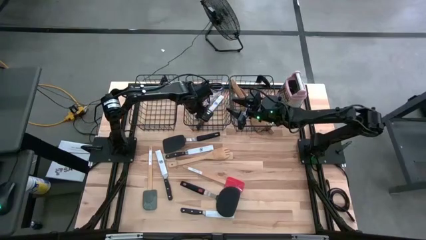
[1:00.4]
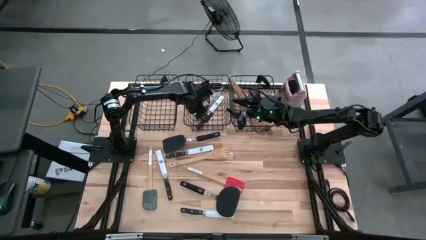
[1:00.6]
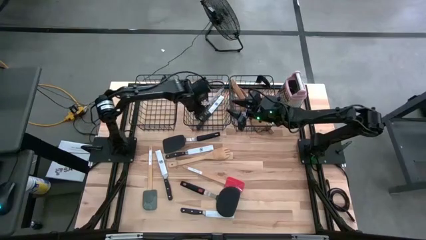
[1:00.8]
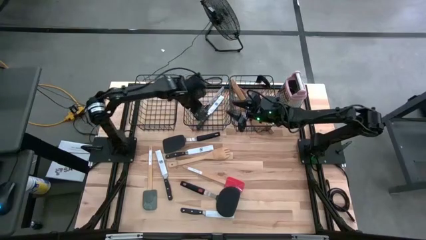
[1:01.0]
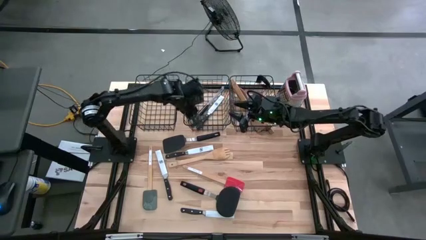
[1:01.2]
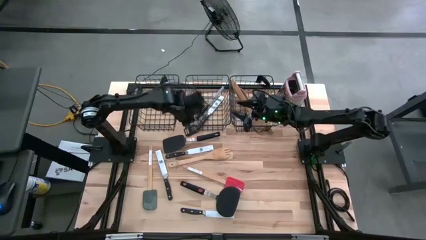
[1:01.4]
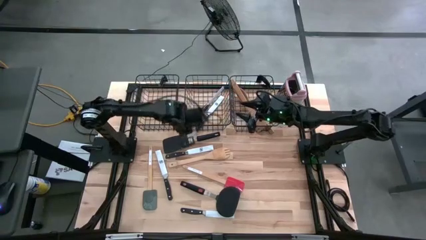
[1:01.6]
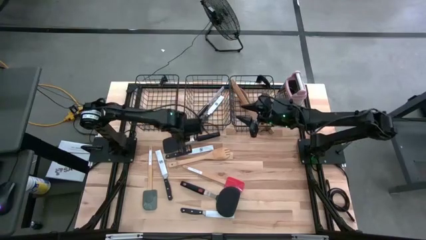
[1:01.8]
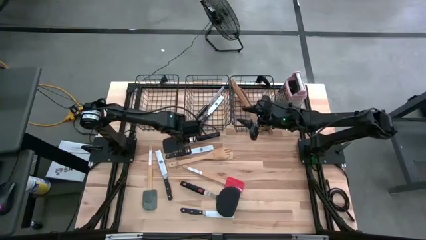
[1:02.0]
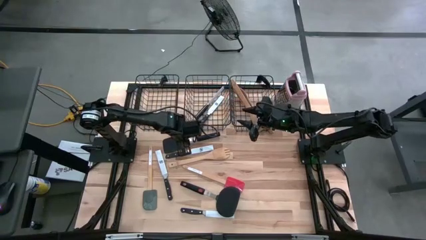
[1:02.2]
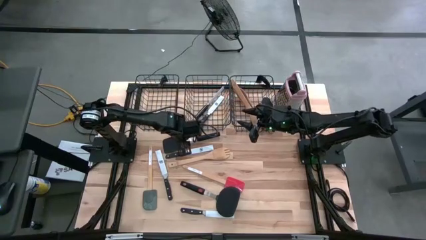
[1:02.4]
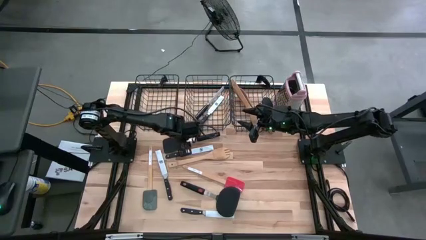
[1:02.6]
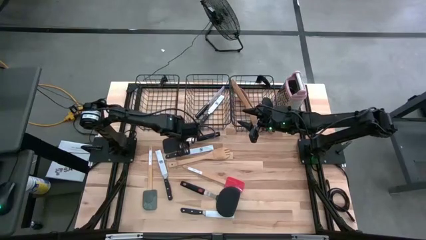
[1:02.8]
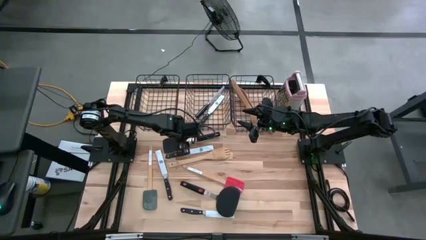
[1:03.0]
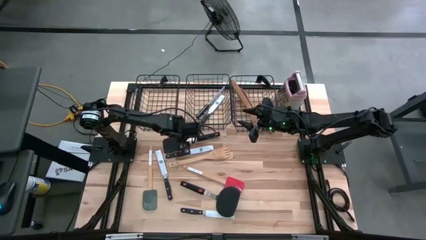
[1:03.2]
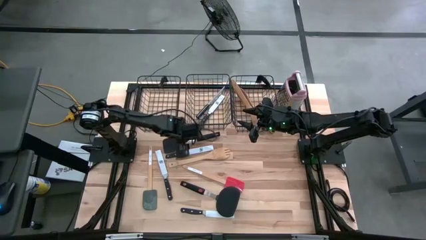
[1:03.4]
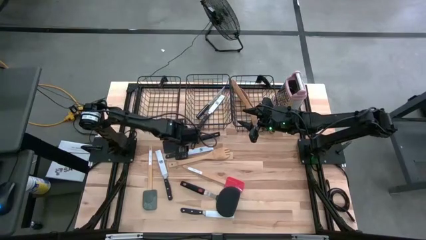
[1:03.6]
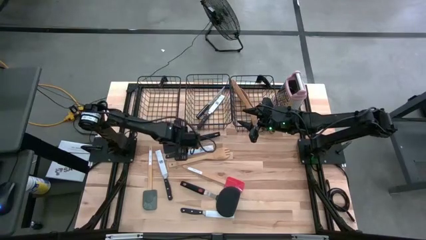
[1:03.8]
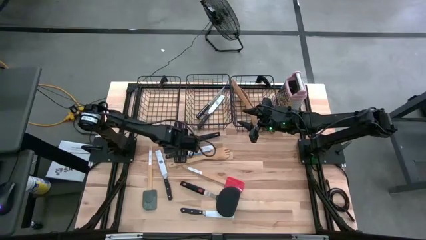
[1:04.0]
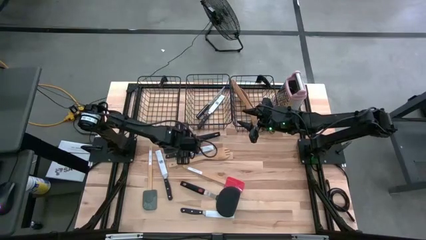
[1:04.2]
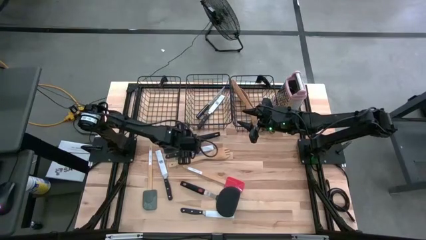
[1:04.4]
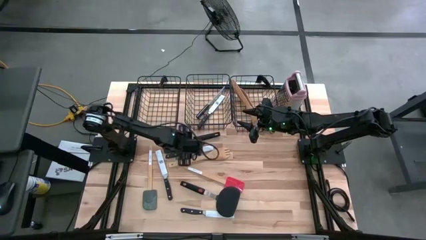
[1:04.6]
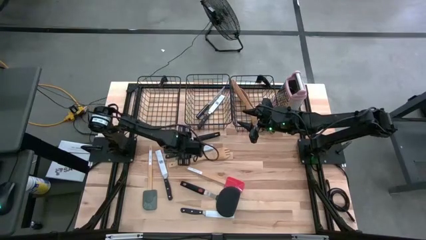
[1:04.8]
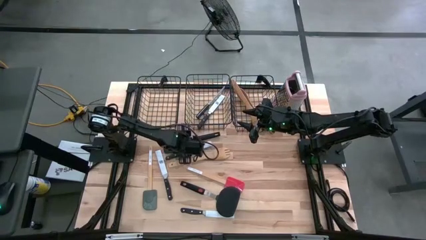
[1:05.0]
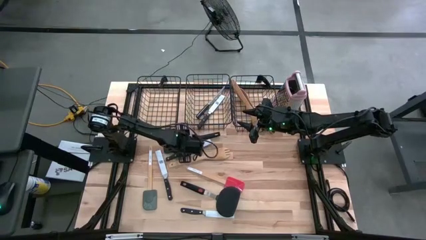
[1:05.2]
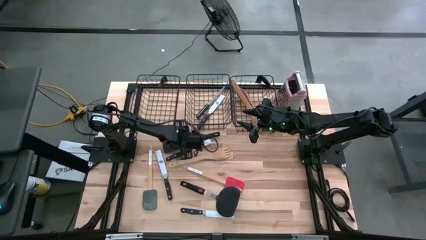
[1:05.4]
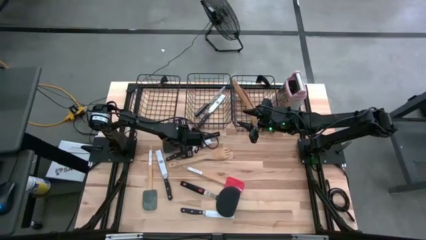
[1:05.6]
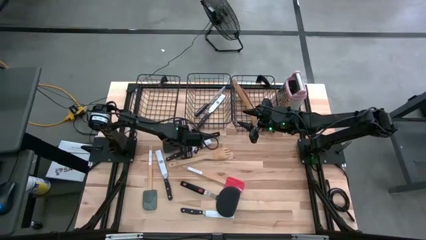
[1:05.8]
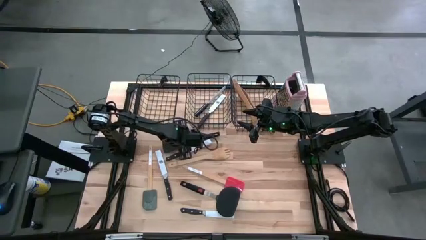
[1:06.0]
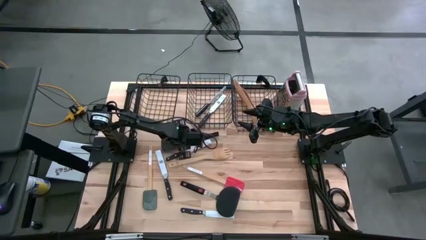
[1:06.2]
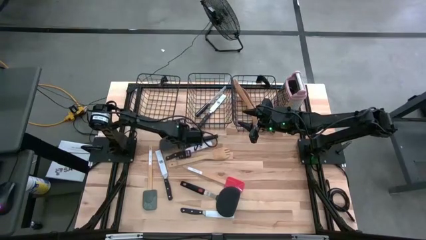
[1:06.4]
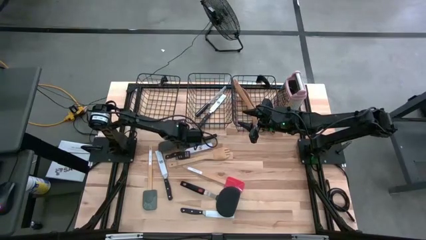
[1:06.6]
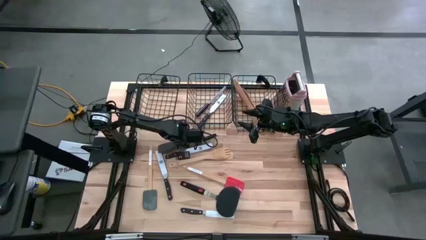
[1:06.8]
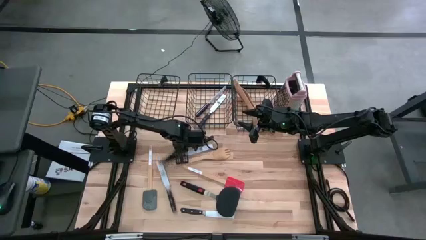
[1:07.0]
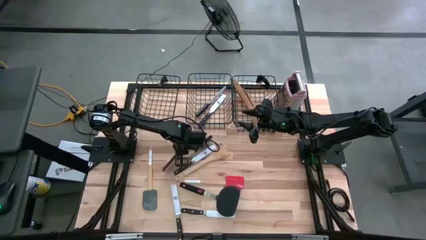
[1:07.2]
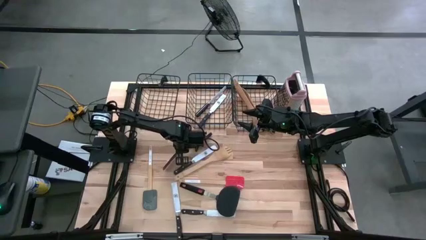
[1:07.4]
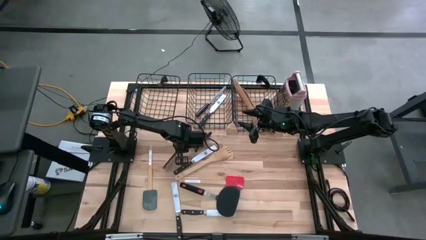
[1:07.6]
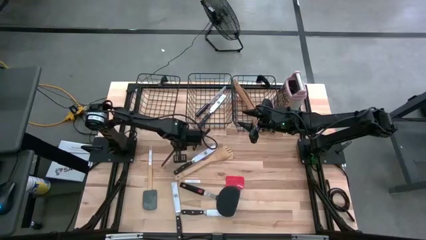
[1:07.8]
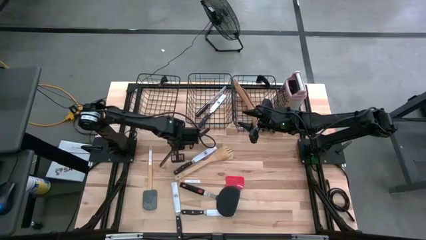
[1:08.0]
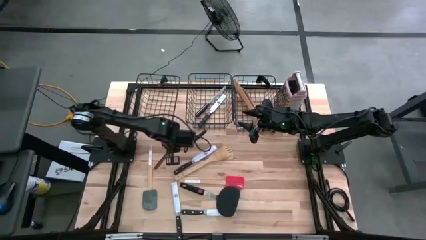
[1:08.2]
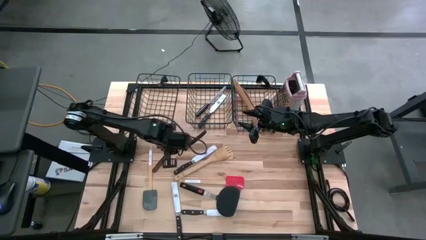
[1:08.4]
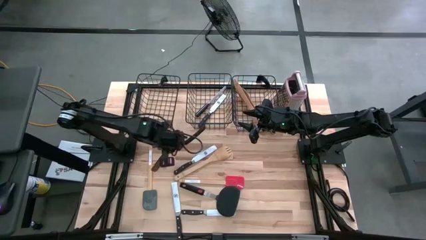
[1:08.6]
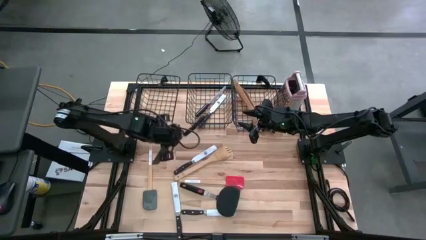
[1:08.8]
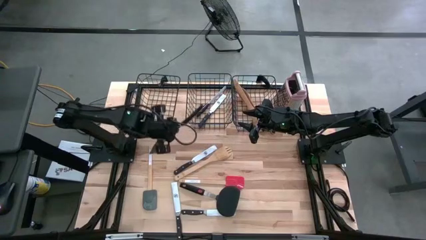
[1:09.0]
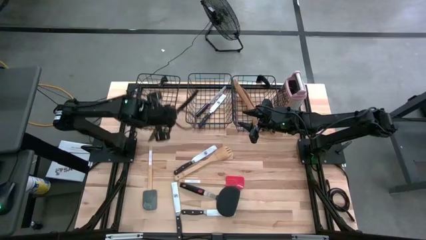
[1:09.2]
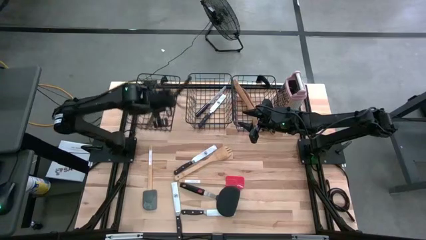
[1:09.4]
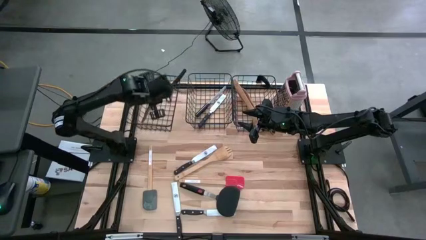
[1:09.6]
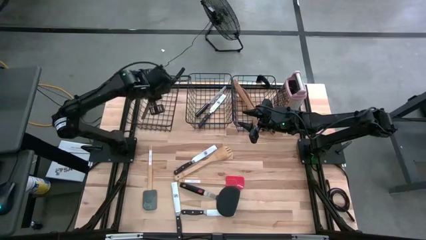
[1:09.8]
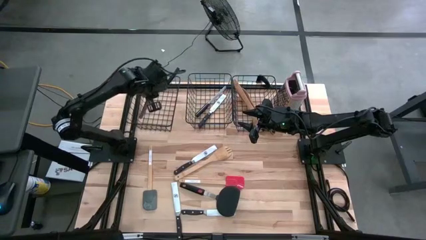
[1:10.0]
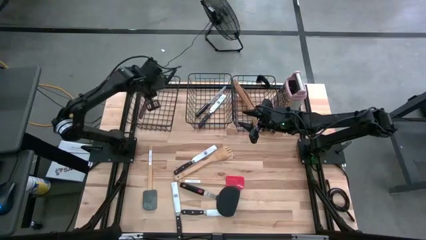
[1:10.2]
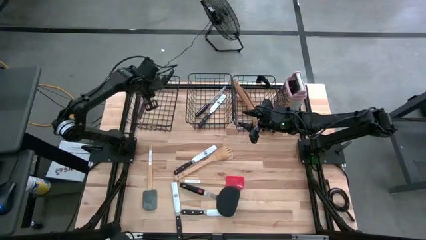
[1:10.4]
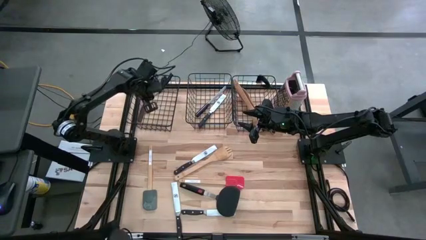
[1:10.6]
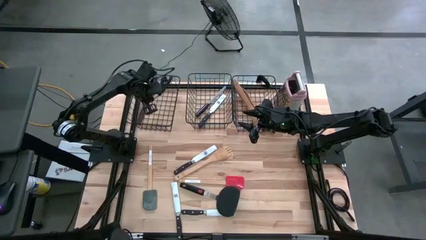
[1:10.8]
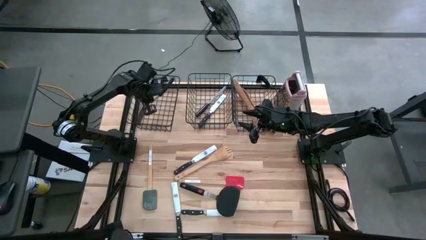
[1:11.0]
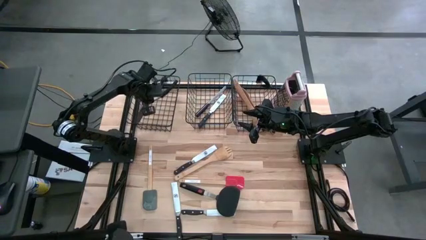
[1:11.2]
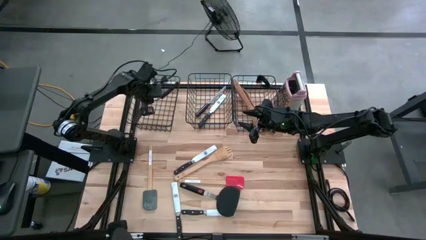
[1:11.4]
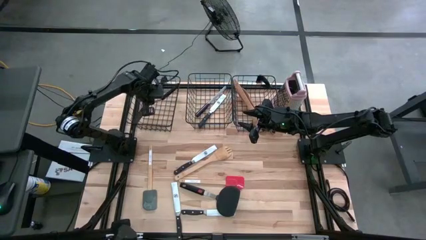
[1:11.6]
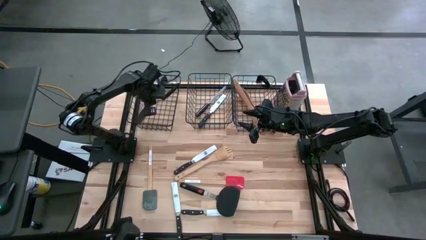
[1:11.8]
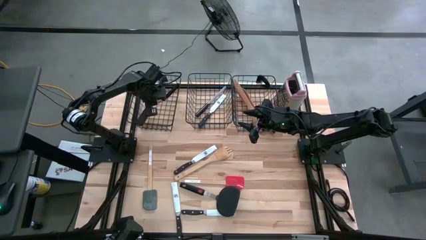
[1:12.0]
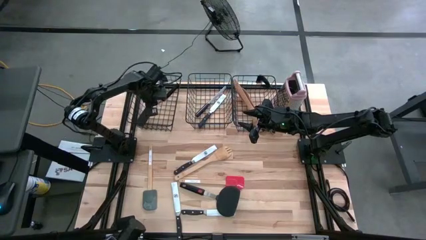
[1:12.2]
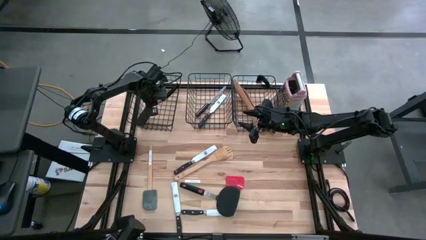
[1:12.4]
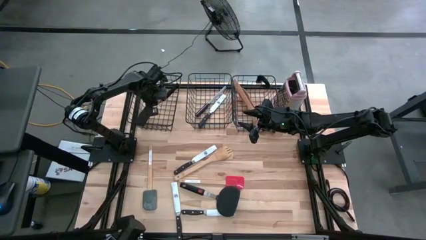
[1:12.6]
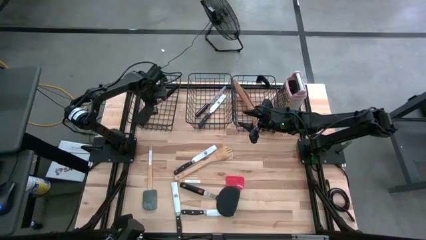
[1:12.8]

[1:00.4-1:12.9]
Task: Pick & Place Kitchen Items
Put the black spatula into the left black wire basket
